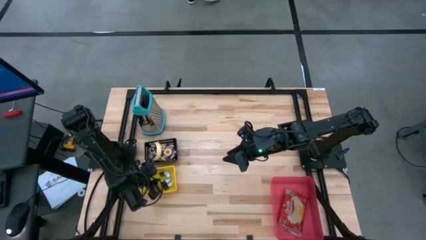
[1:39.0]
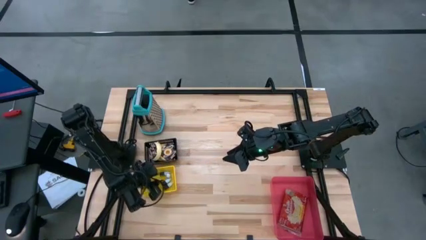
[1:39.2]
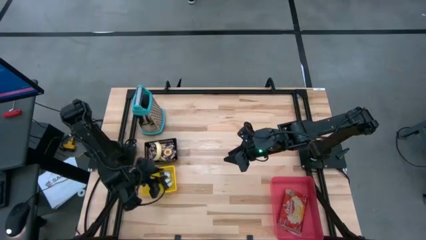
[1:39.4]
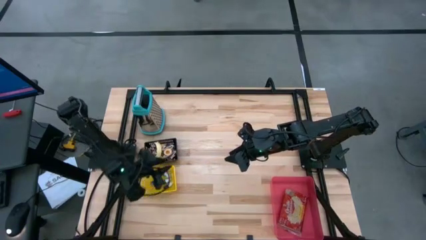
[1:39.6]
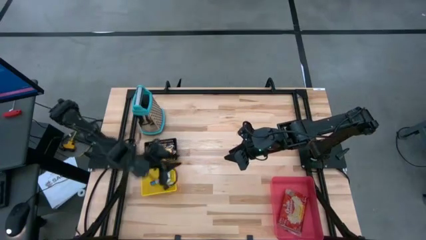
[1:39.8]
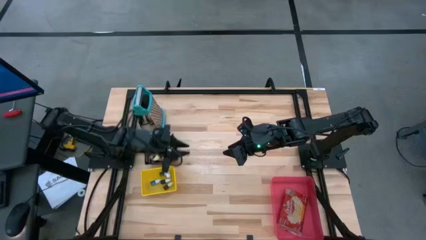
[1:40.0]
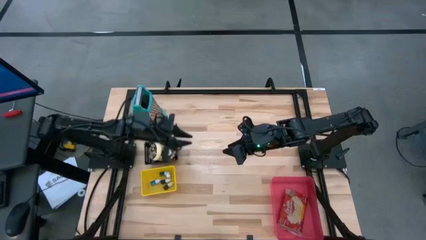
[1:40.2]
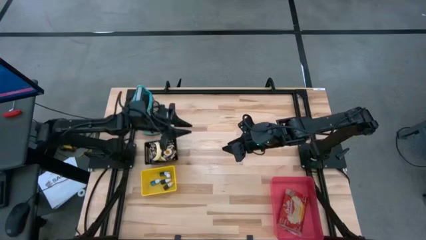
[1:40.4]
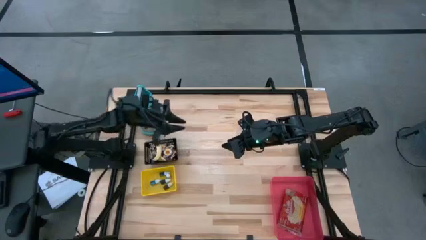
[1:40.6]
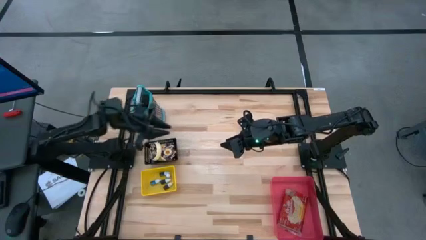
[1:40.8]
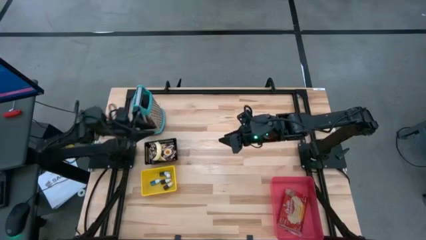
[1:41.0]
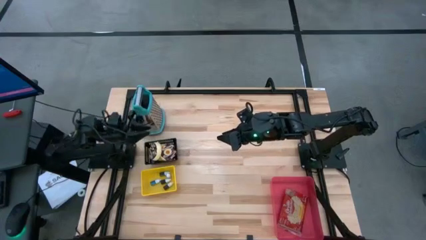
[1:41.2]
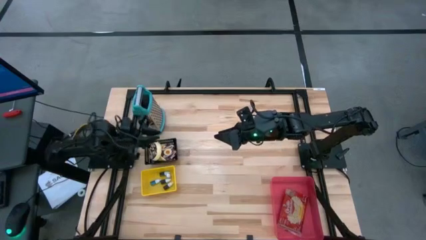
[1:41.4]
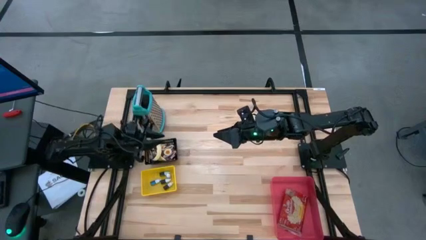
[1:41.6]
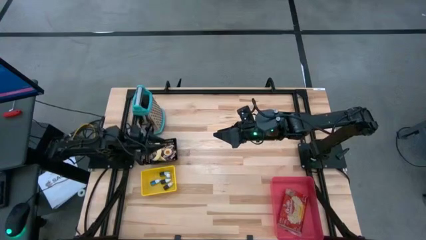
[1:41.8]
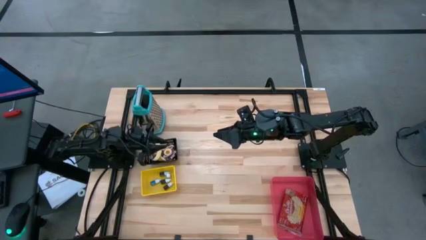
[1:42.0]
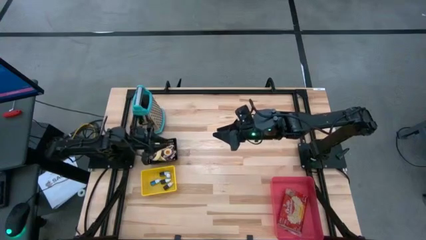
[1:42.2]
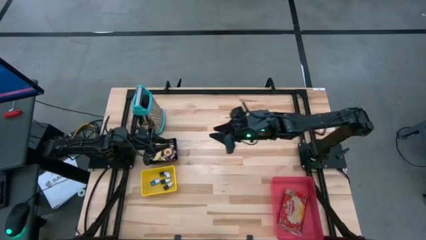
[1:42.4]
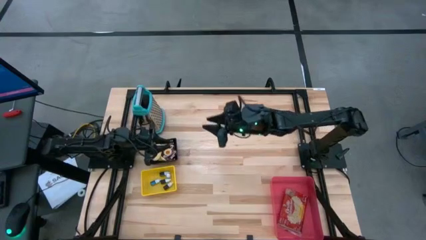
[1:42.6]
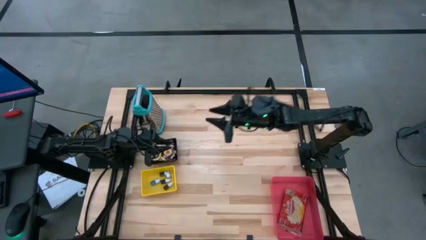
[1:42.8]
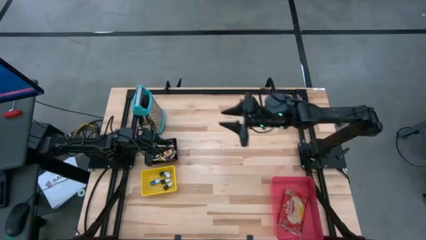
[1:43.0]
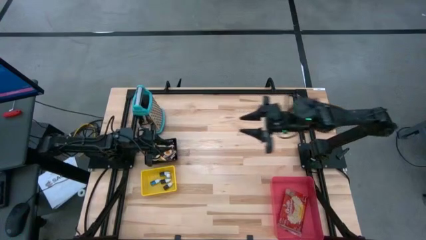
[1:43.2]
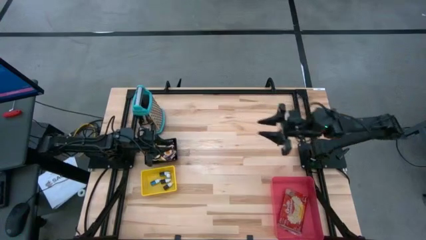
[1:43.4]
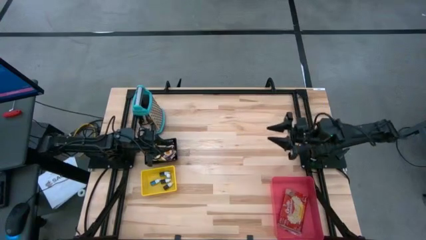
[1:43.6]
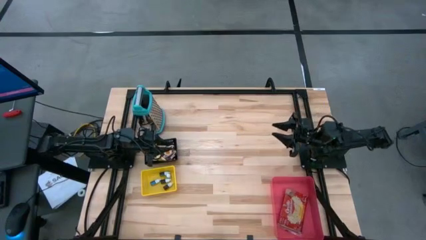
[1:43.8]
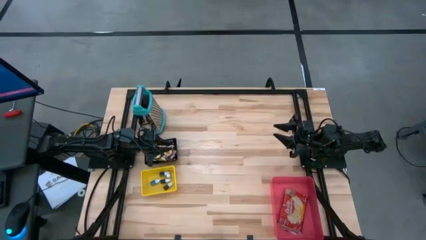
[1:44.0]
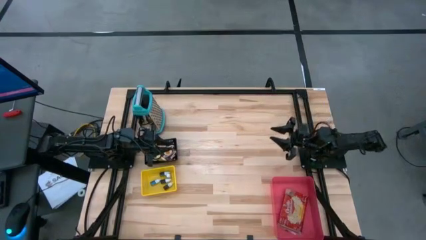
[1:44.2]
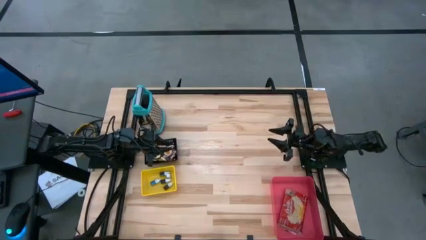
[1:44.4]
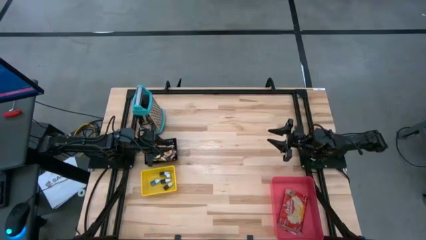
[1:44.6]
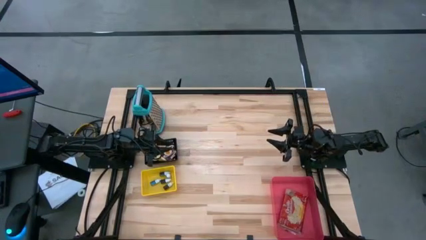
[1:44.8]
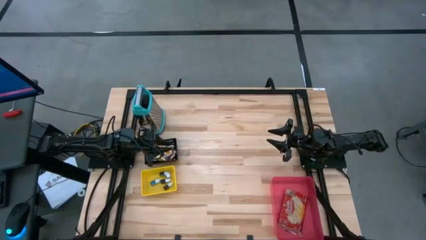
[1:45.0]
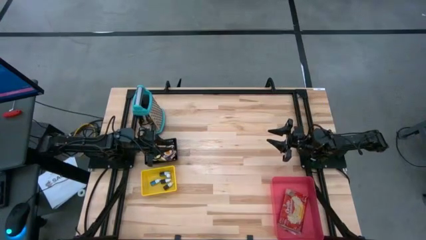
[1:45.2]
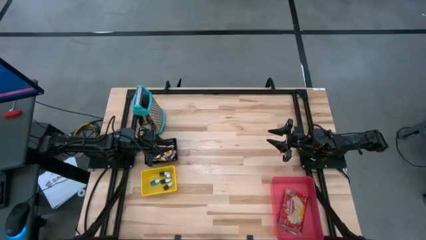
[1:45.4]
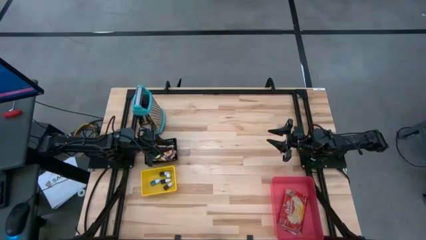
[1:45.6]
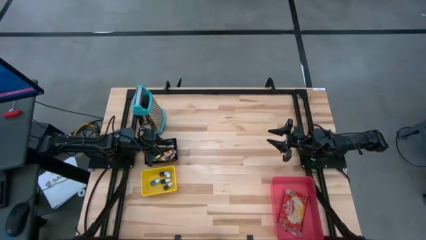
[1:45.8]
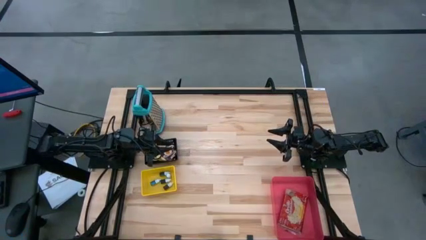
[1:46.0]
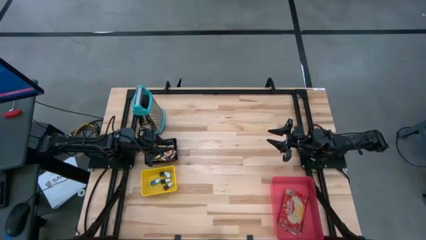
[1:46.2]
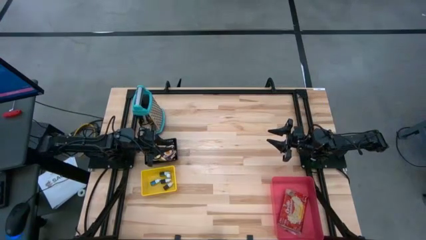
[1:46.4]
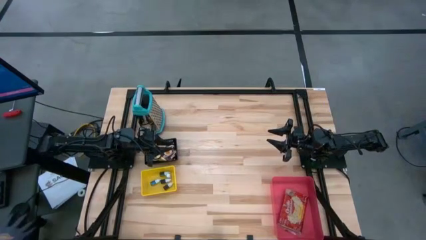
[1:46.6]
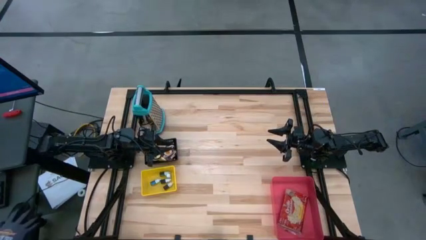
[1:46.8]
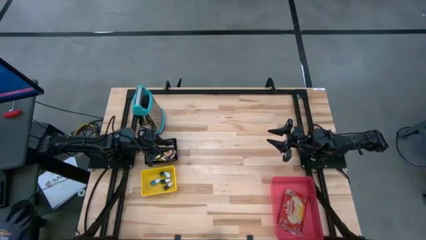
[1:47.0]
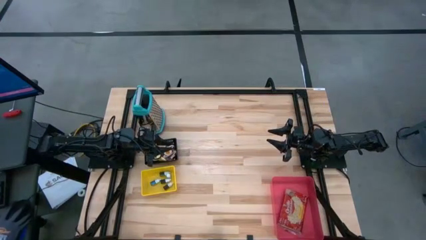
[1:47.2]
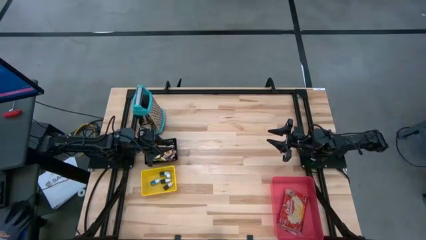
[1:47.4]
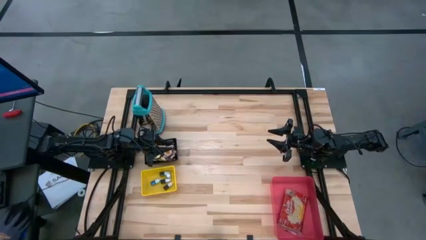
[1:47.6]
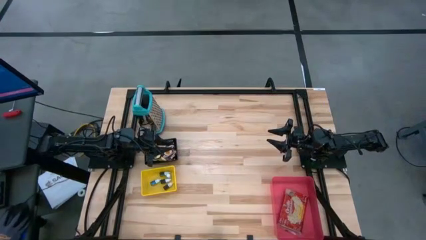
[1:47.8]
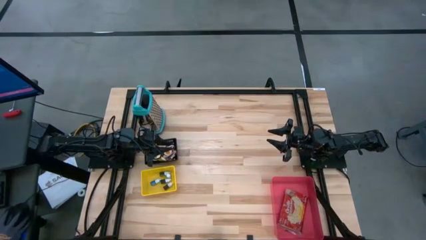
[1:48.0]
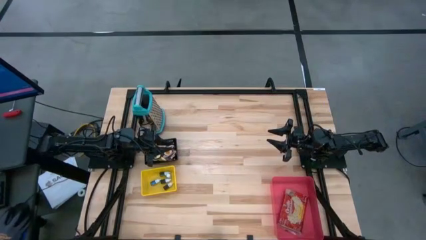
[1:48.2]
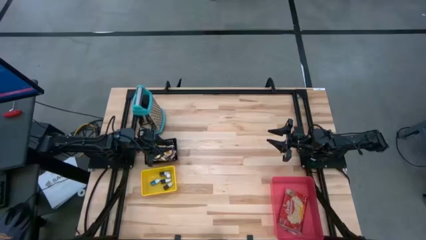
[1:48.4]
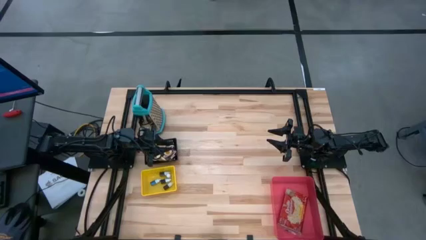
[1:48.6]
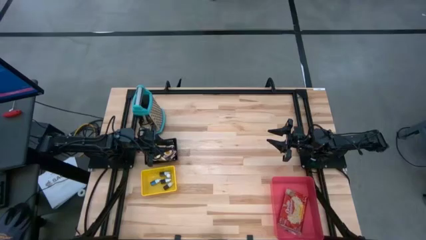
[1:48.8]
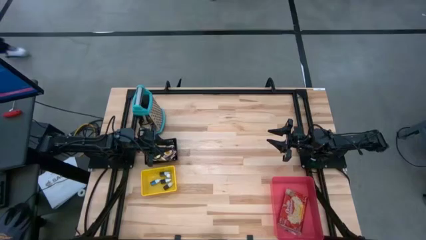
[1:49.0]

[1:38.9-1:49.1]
Return to Home Position
